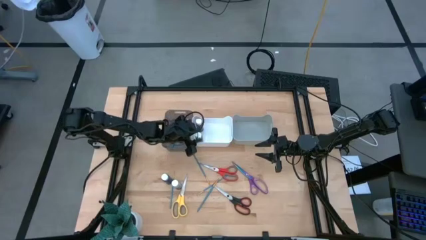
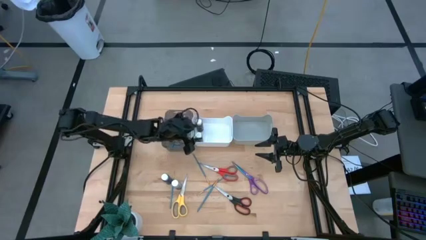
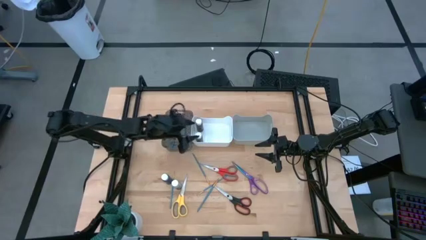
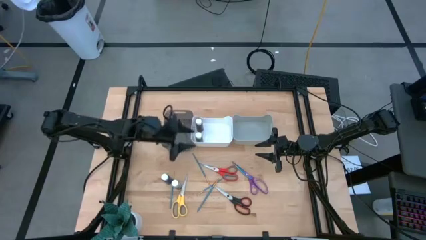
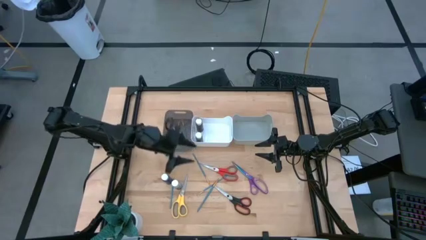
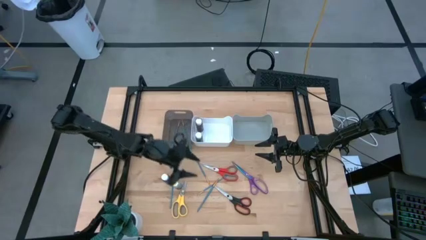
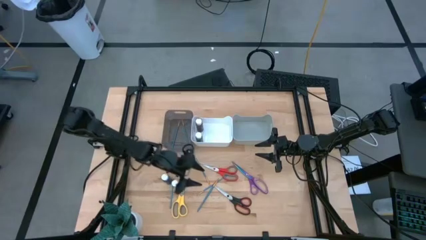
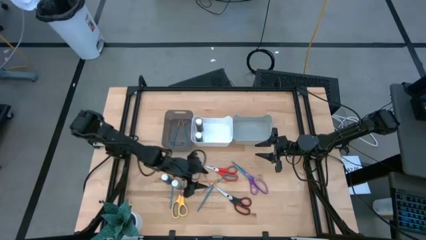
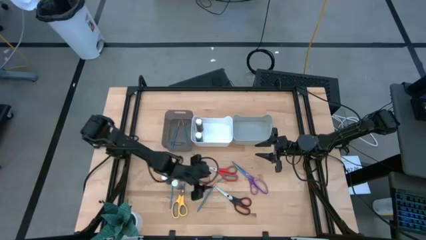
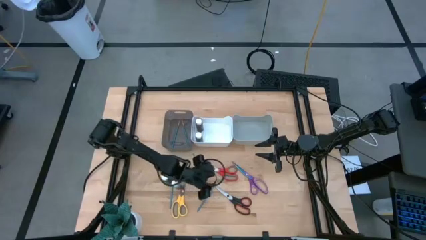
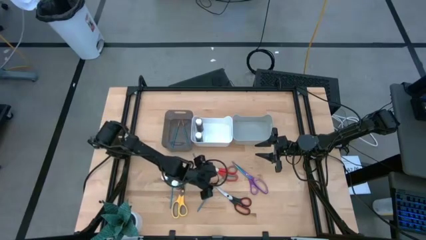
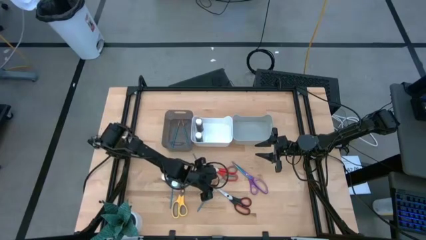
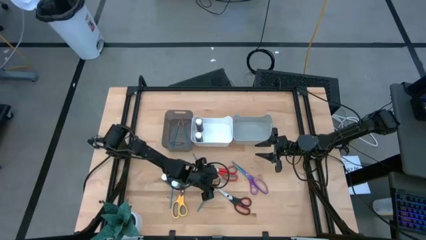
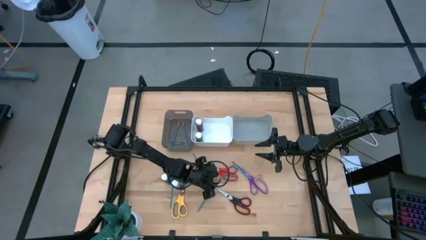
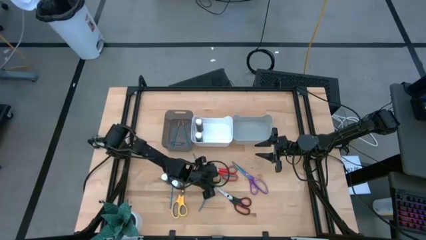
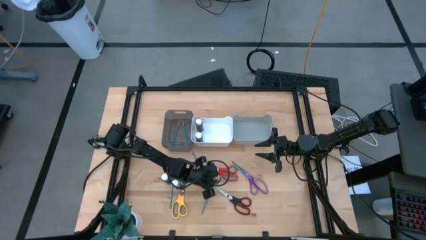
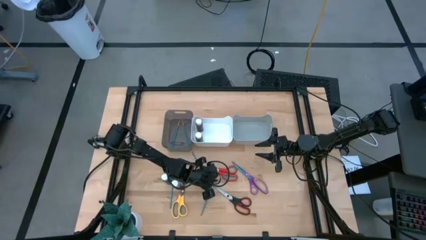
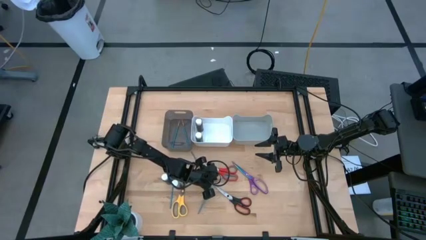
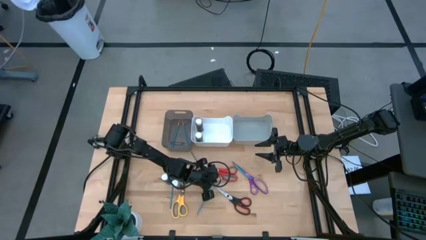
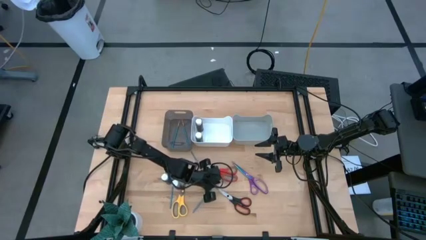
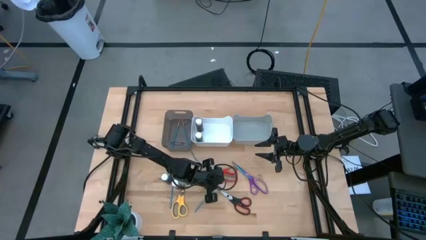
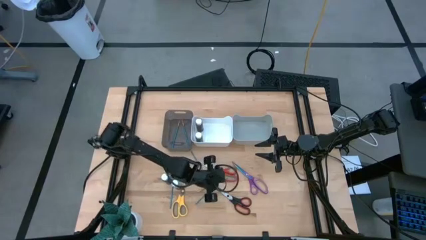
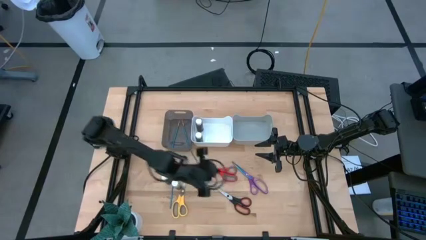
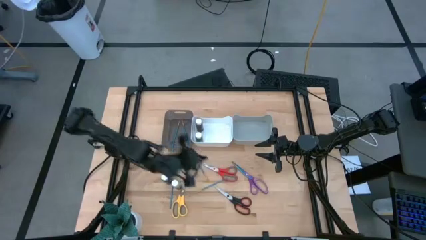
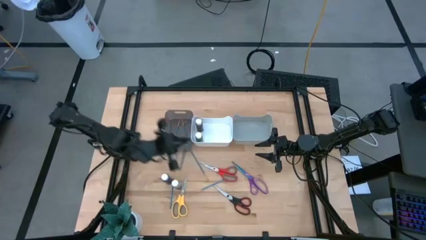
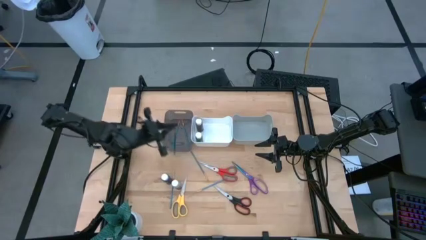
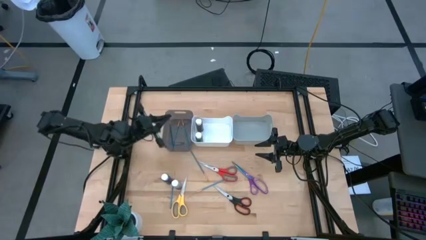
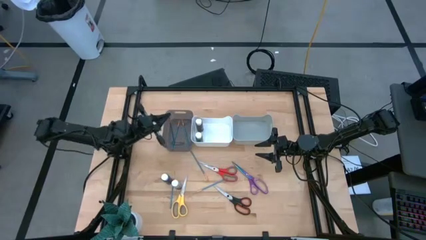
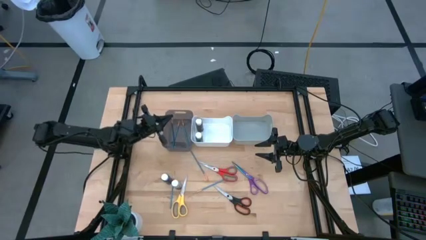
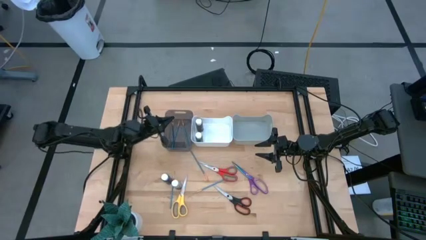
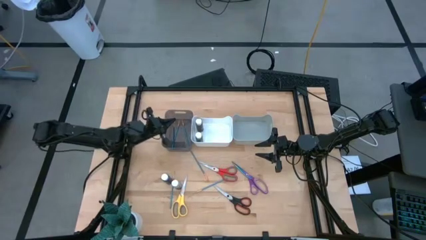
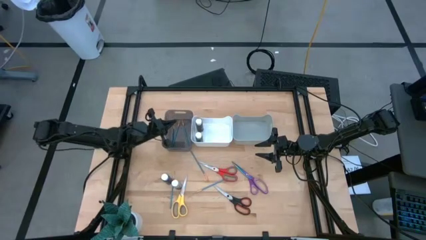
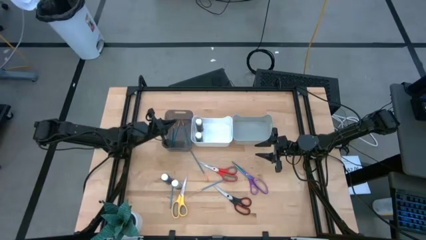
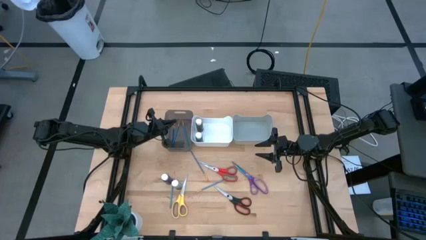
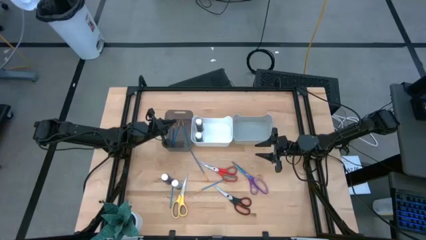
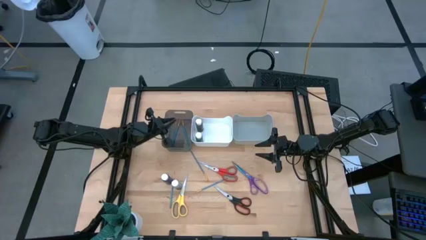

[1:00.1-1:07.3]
Task: Pick & Place Paint Supplies
Put the blue paint brush into the black bin

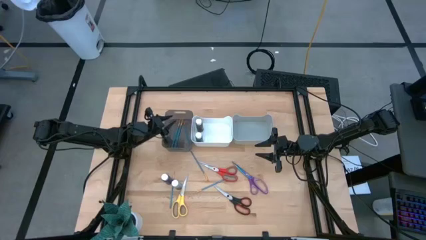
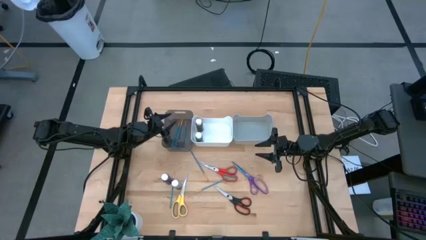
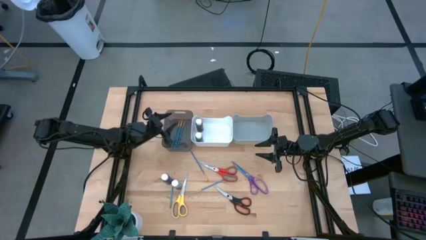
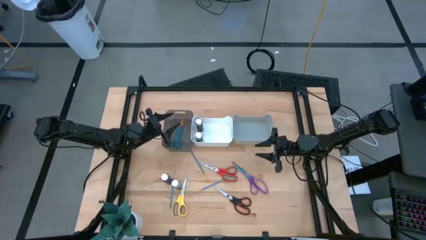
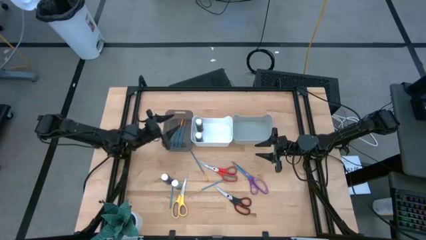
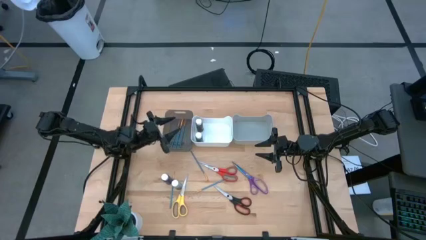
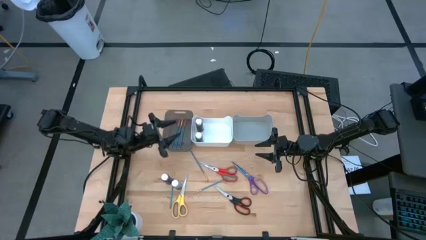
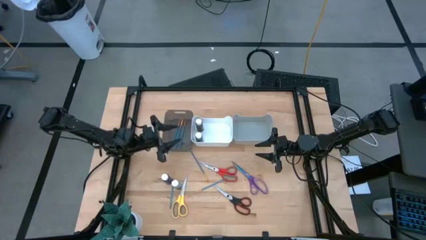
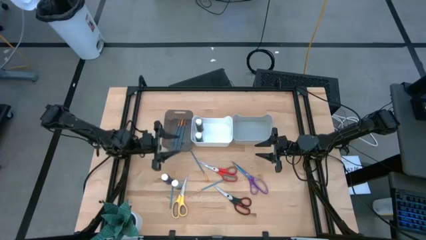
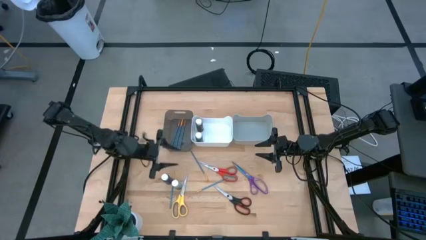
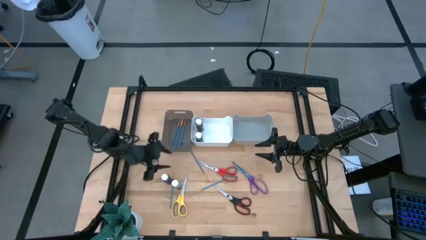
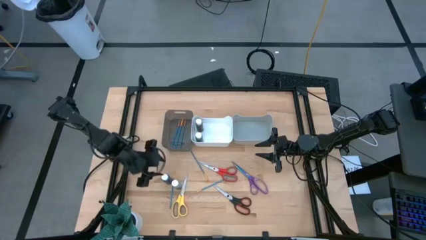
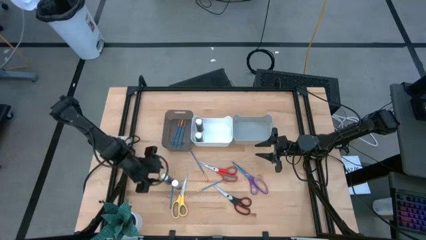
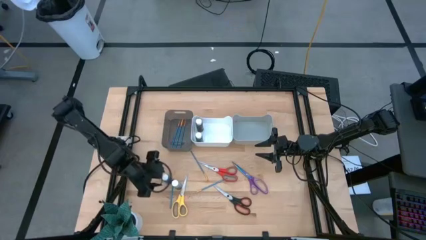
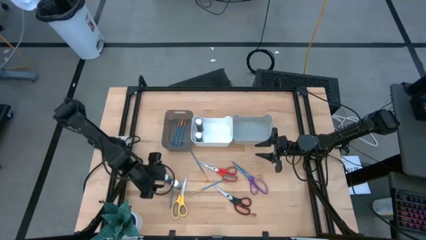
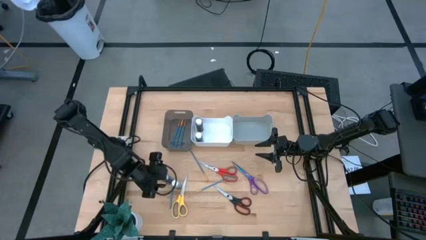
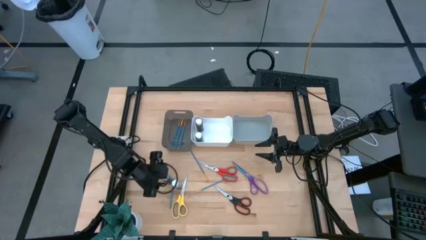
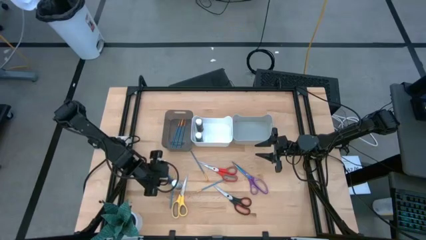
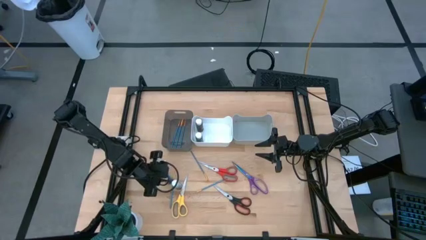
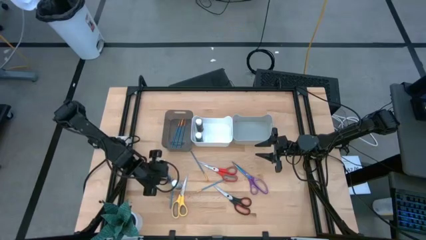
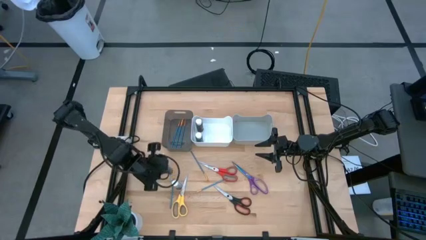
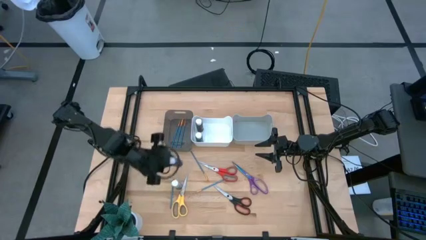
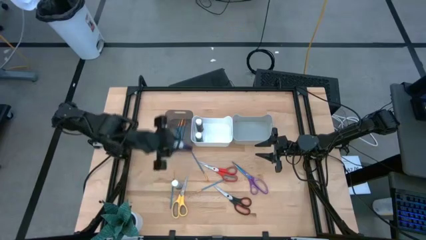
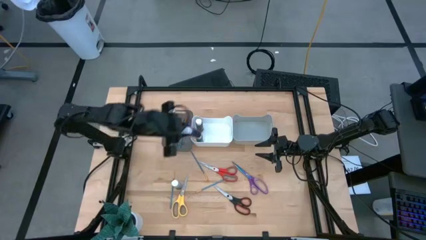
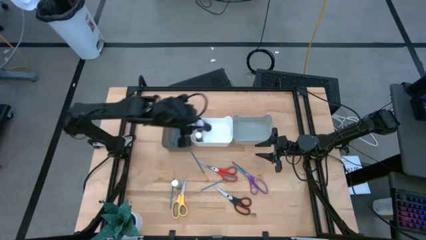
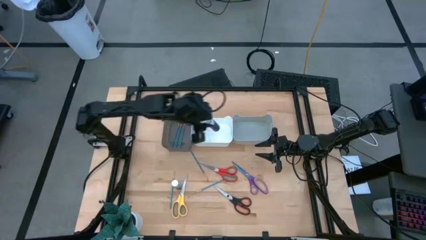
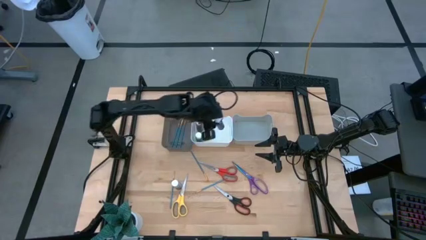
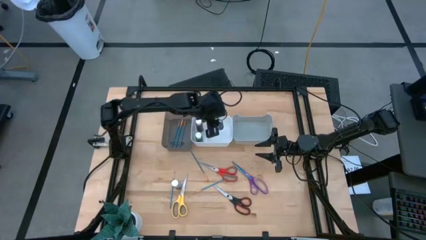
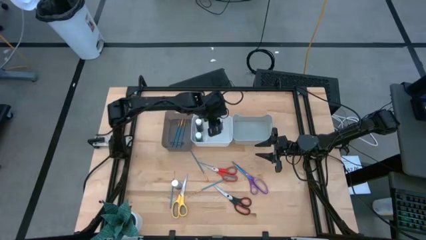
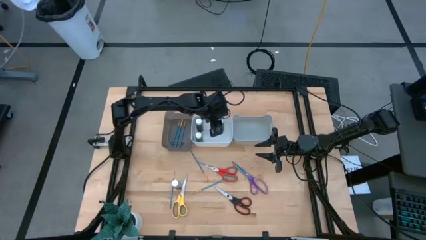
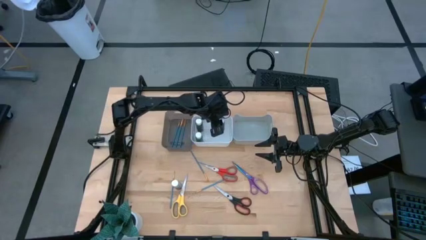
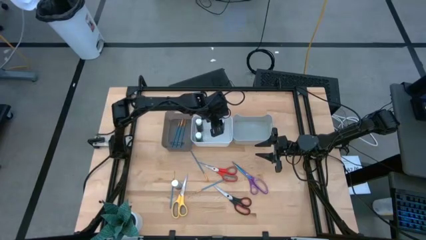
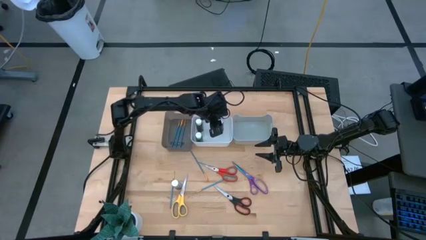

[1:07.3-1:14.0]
Put the blue paint bottle into the white bin

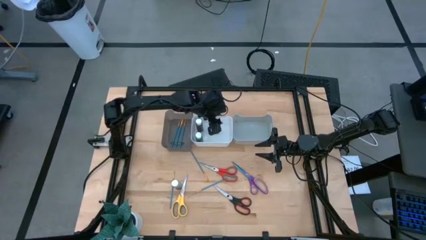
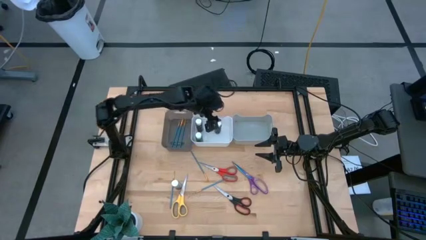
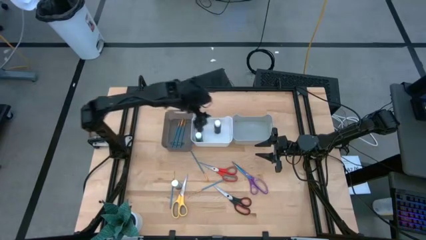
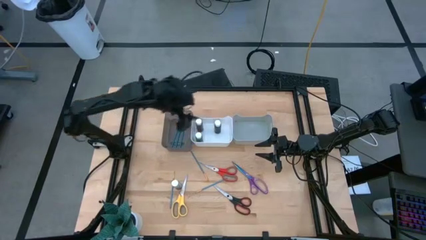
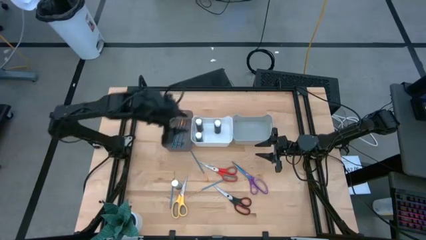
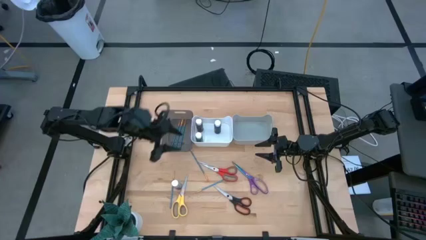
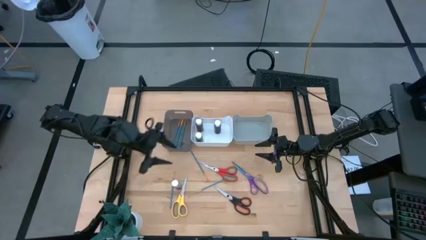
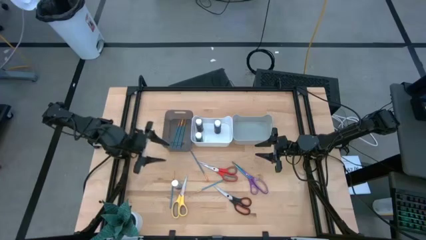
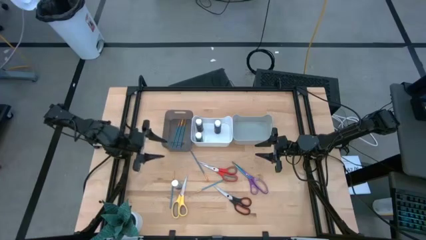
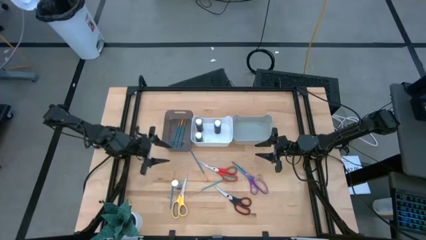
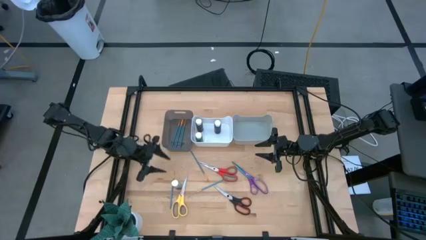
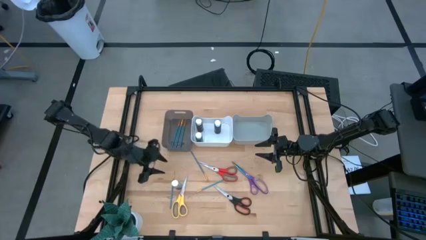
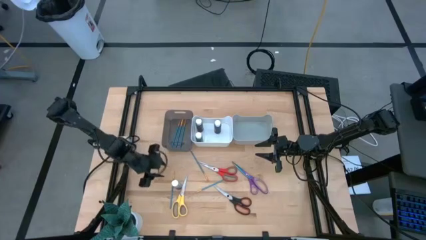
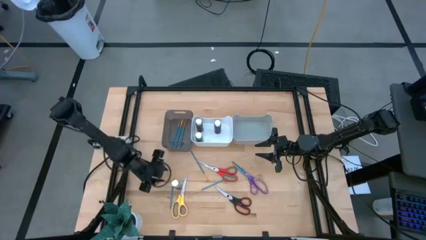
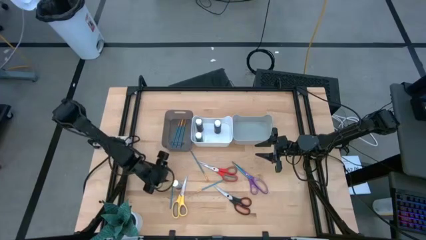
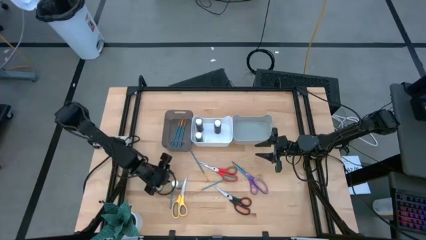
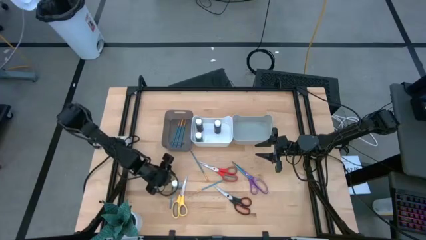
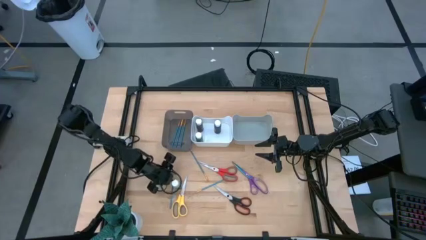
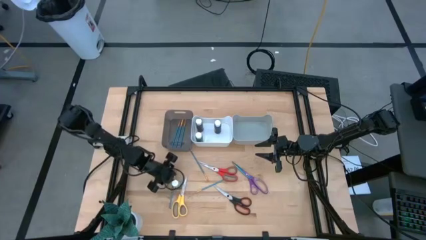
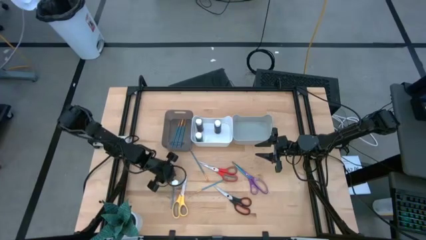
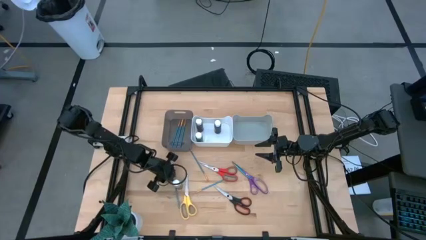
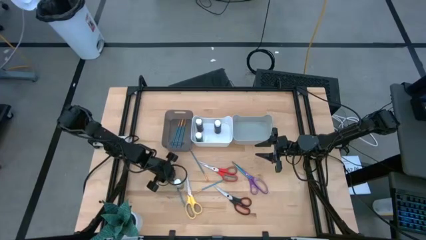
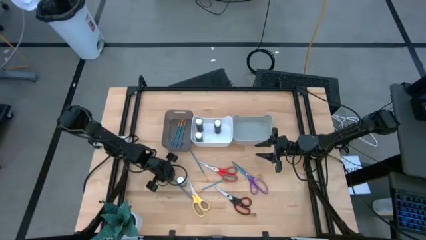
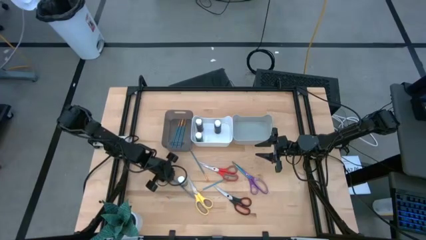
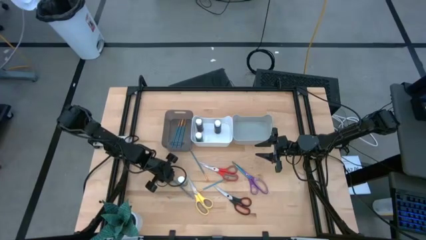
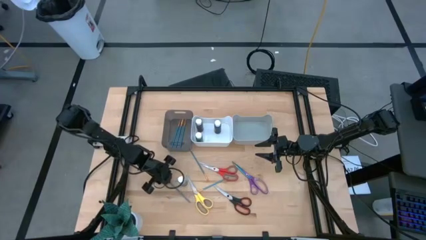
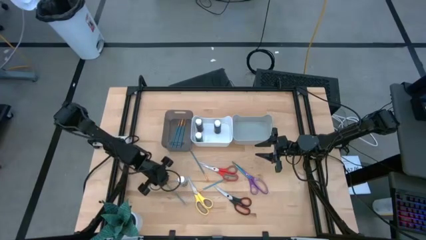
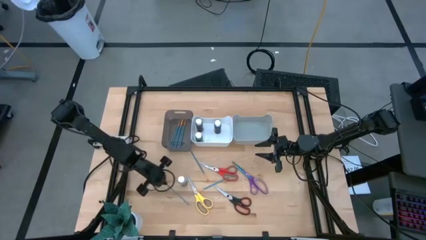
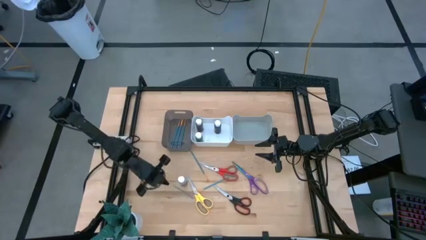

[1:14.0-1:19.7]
Put the blue paint brush into the black bin
